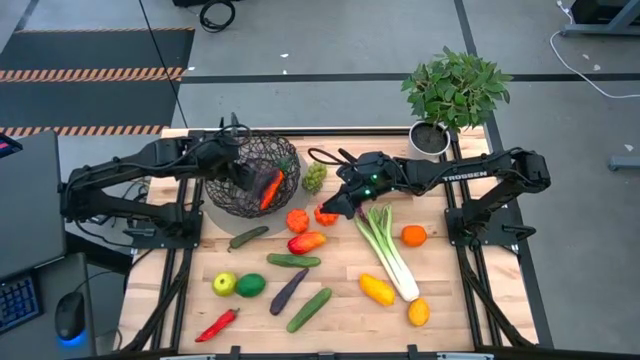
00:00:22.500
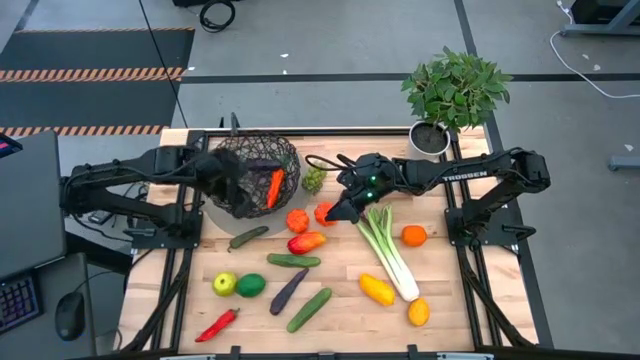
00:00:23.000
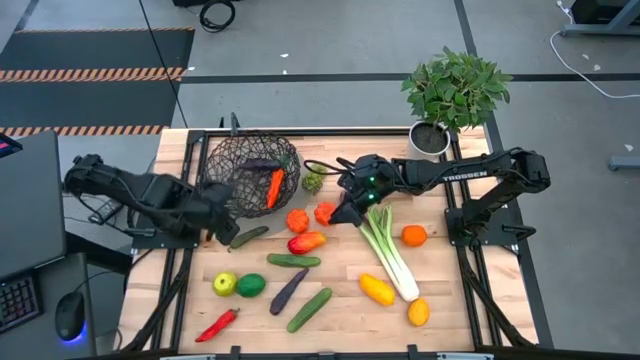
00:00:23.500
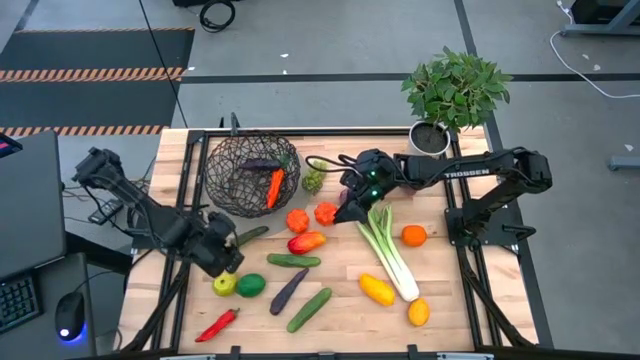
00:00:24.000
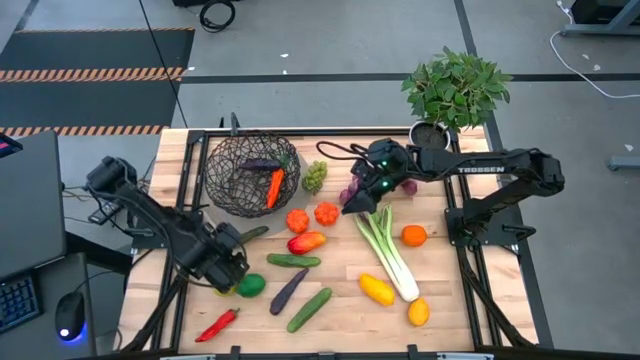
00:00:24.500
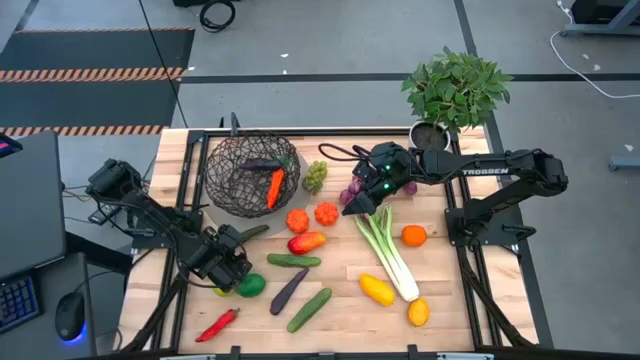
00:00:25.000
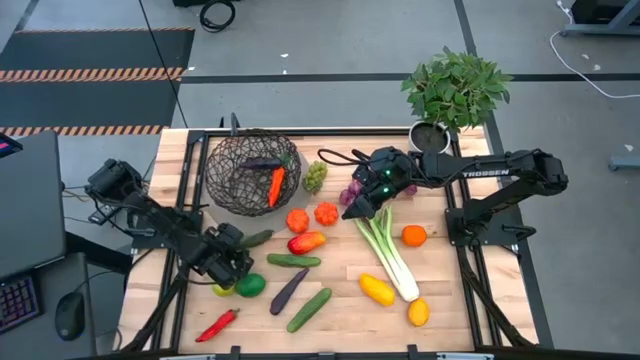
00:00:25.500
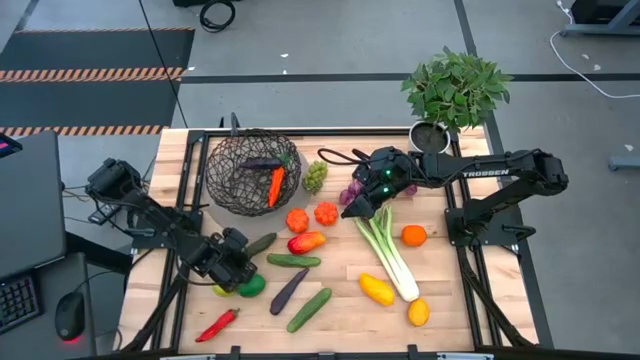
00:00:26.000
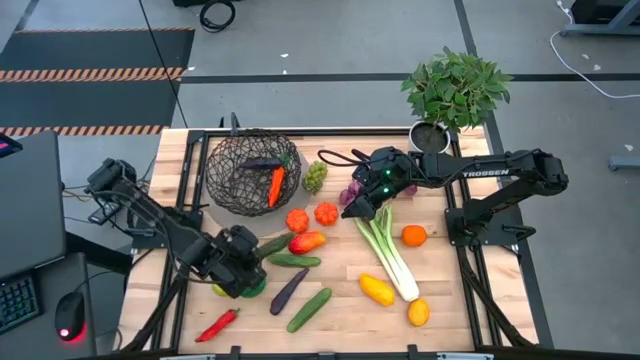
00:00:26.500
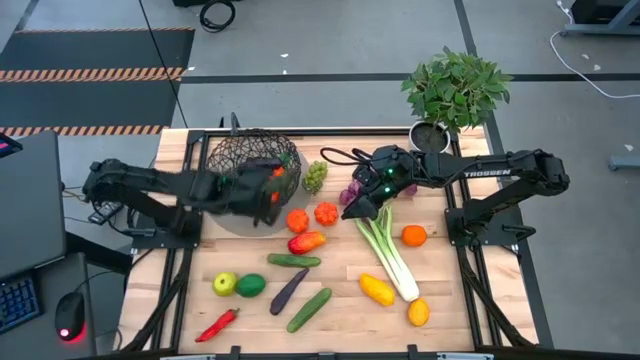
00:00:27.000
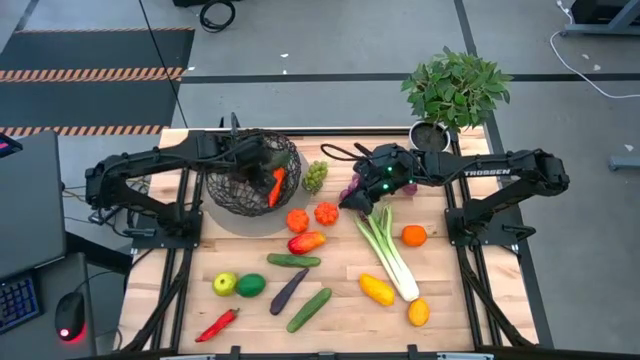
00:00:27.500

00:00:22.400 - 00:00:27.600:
Task: Build produce basket
Put the green chili pepper into the black wire basket

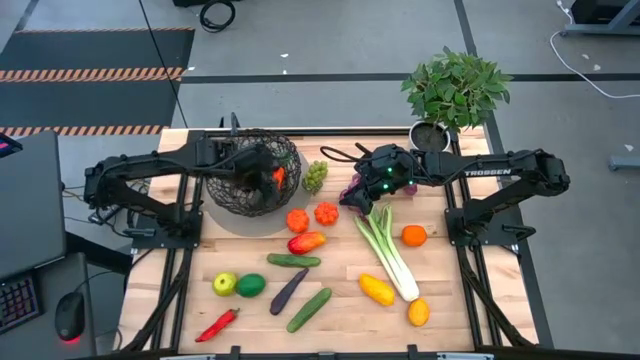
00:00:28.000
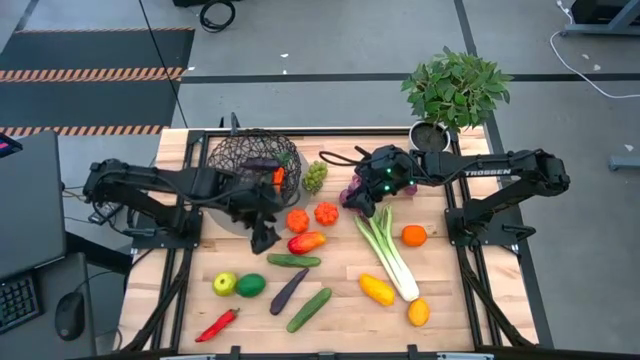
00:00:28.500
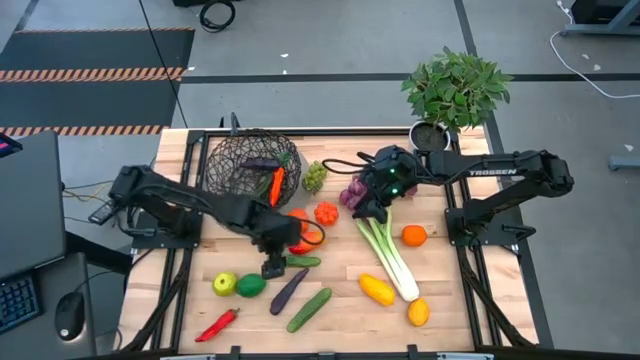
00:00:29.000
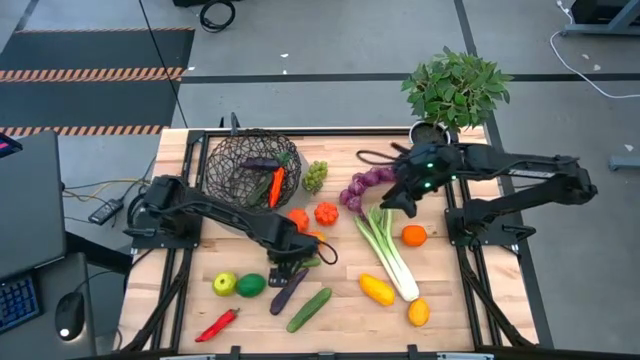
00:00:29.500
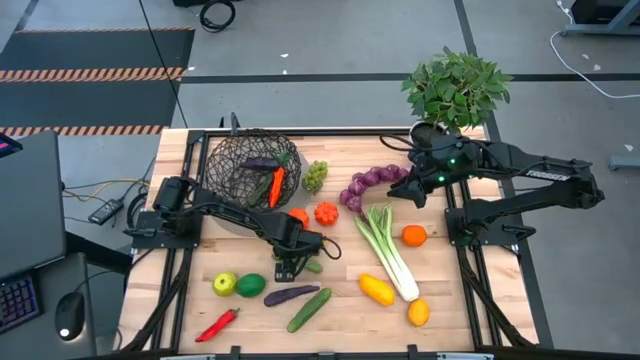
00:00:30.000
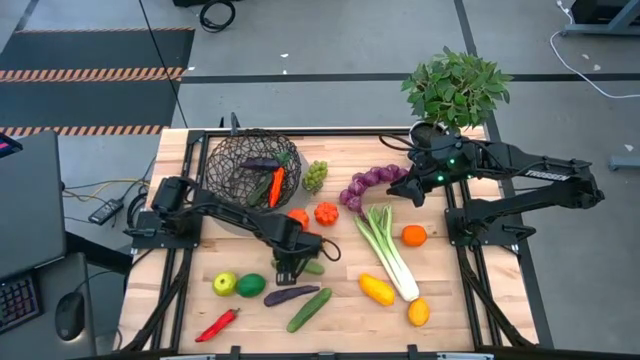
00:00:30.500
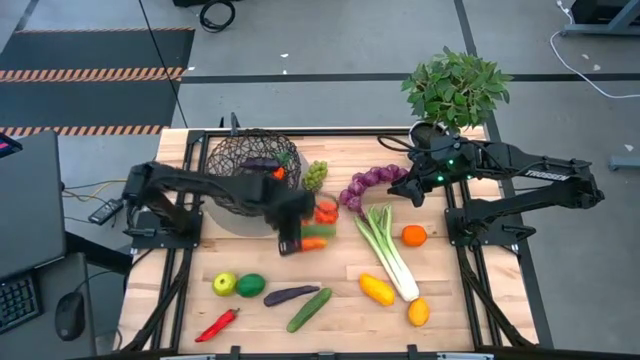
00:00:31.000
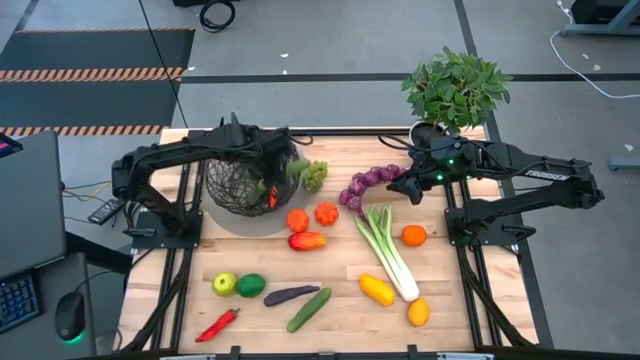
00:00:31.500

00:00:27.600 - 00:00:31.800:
Put the top green cucumber into the black wire basket

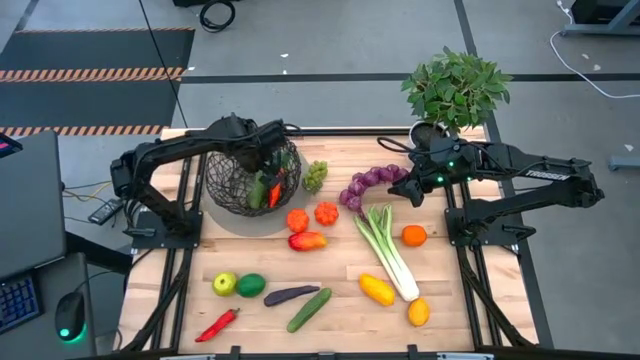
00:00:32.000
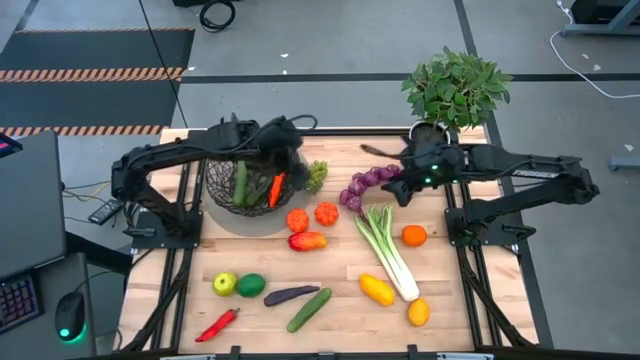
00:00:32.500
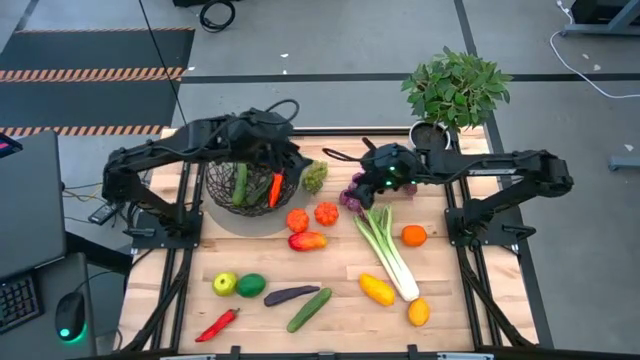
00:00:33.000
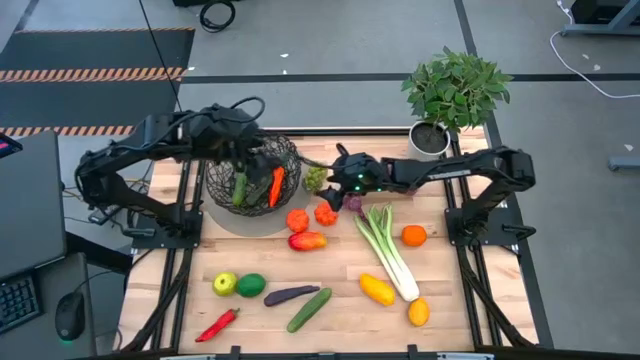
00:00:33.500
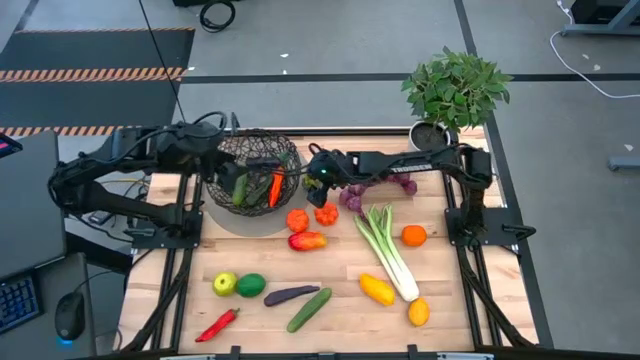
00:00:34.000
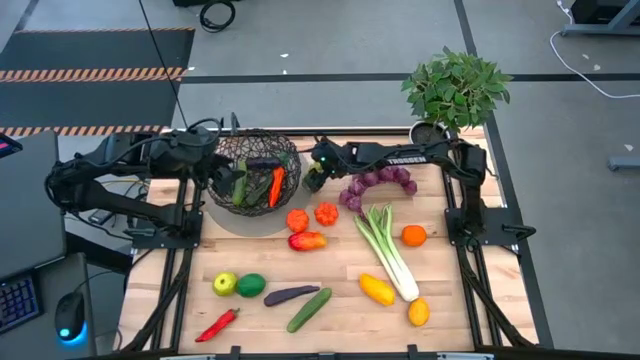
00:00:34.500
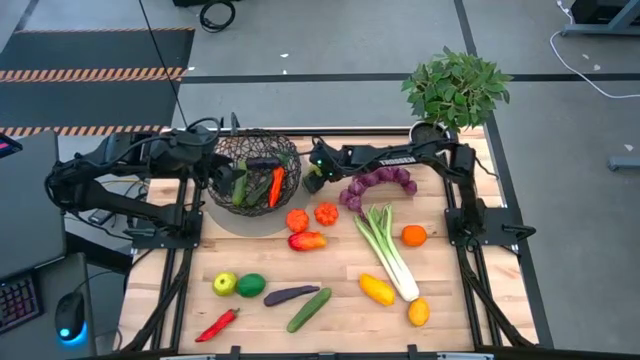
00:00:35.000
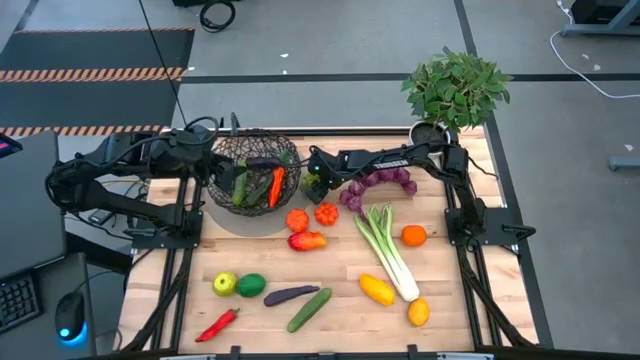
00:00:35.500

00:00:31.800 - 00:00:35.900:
Put the green grapes into the black wire basket

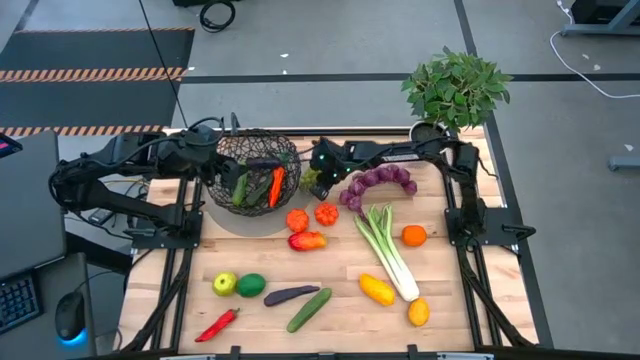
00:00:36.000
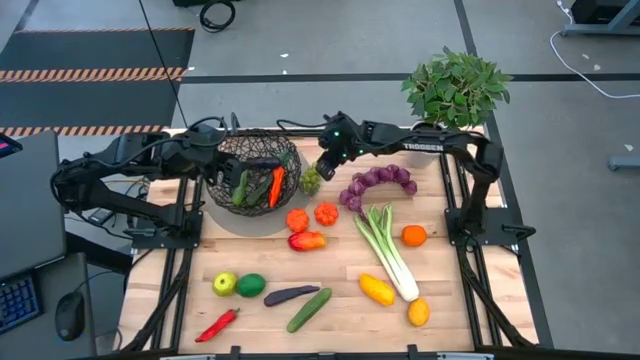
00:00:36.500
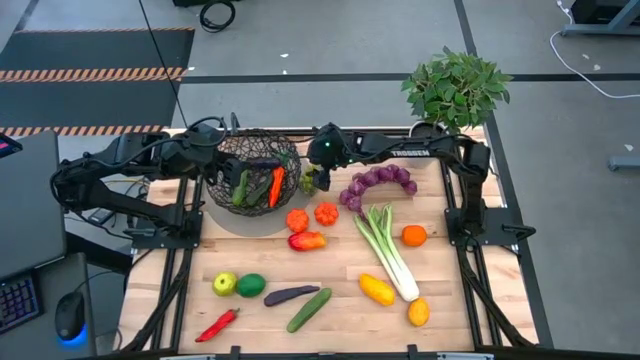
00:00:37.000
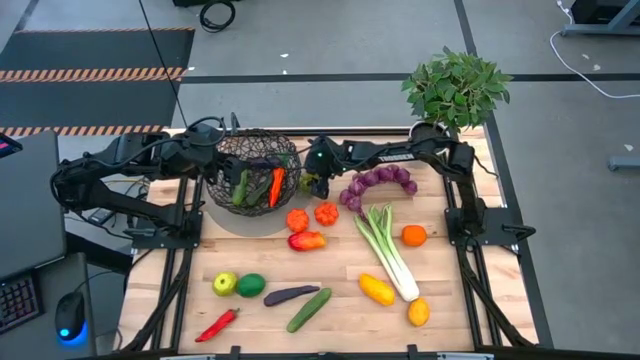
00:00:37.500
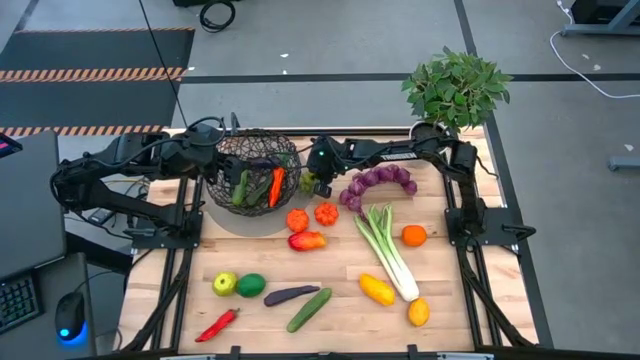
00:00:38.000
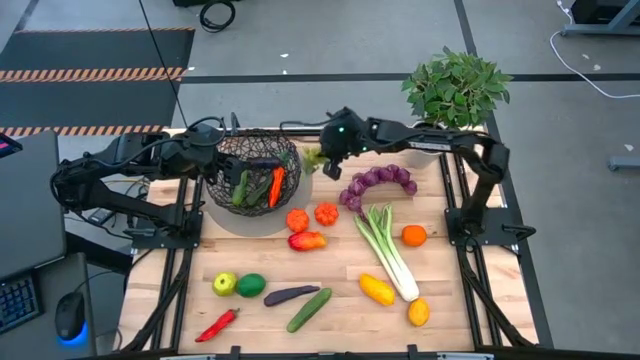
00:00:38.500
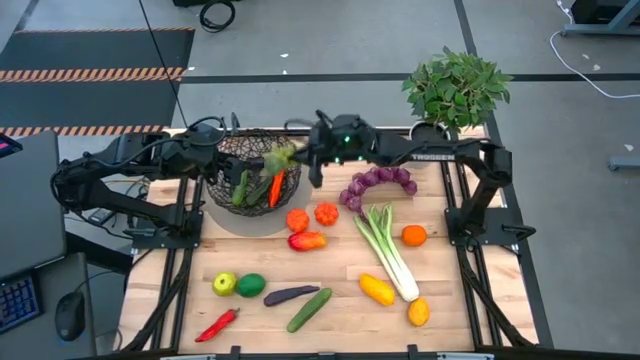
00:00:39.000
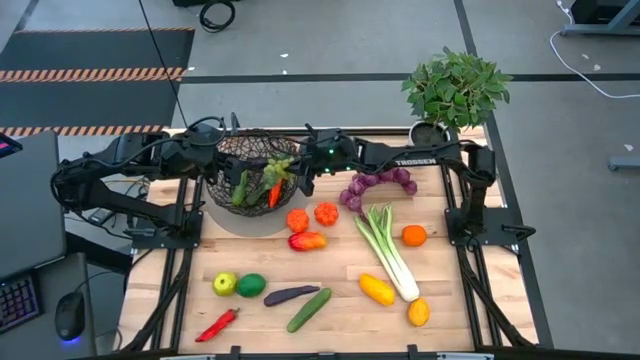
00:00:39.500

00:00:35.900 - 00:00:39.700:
Put the green grapes into the black wire basket

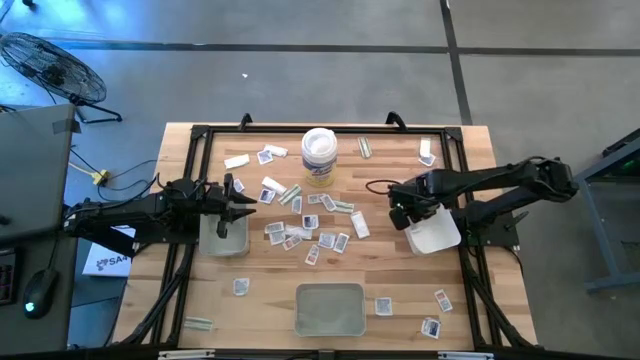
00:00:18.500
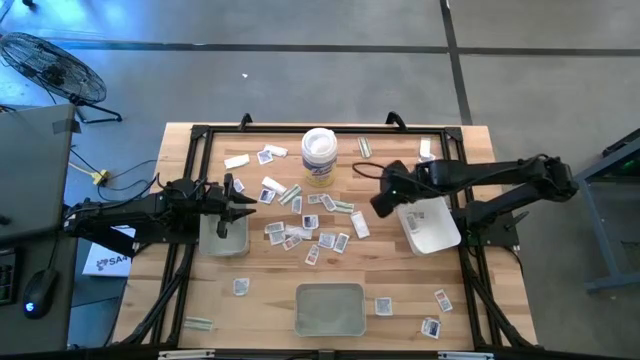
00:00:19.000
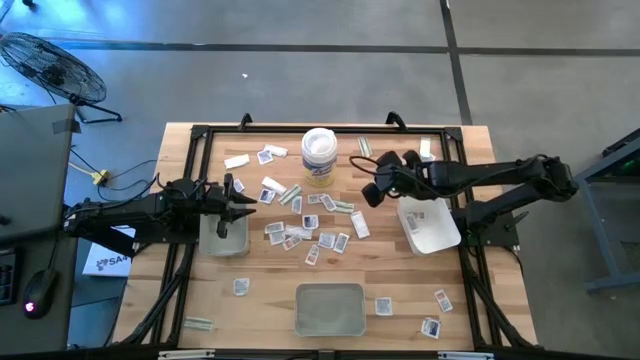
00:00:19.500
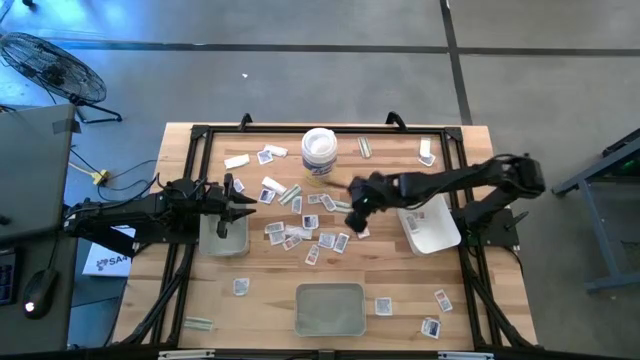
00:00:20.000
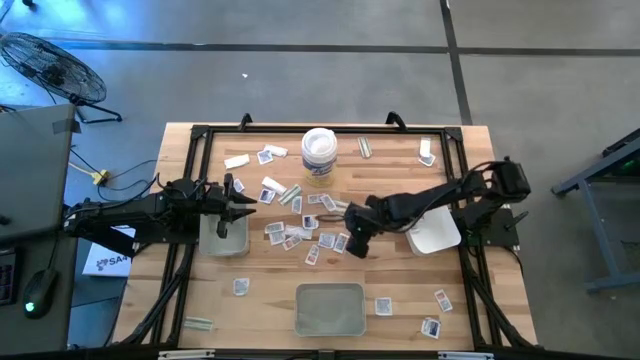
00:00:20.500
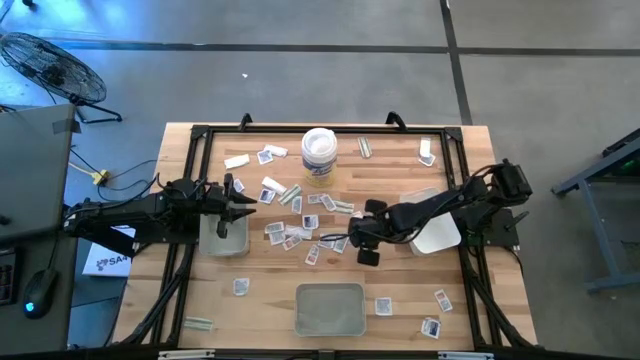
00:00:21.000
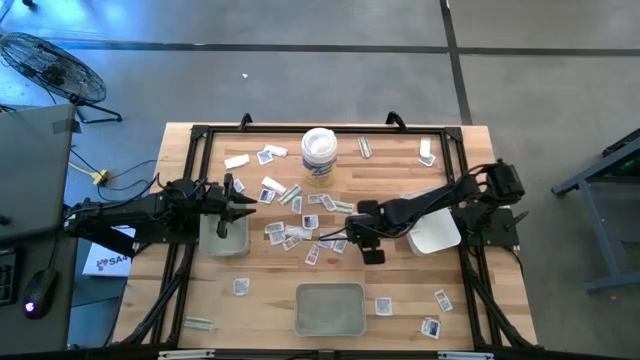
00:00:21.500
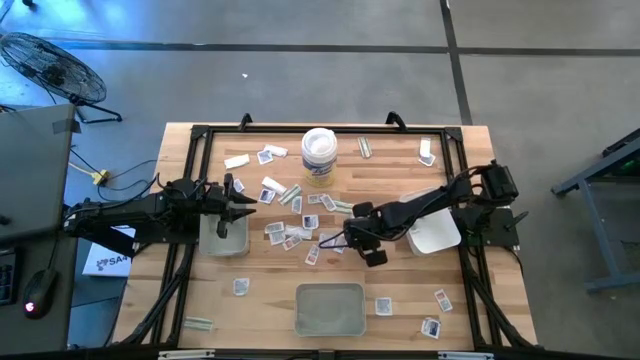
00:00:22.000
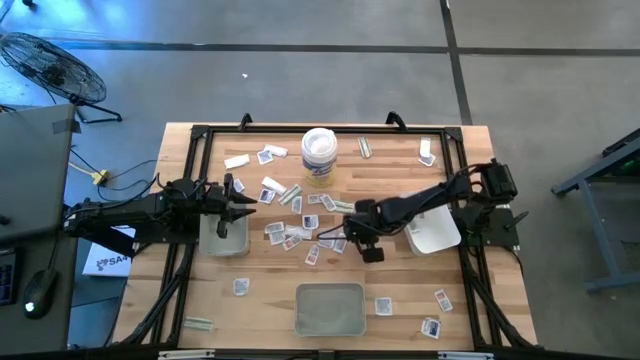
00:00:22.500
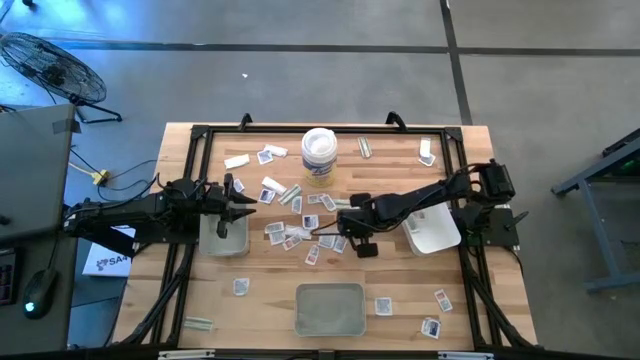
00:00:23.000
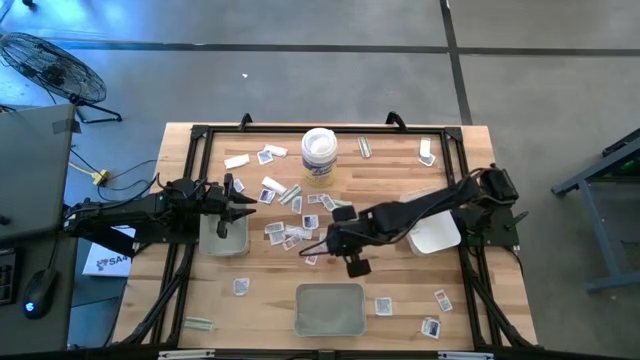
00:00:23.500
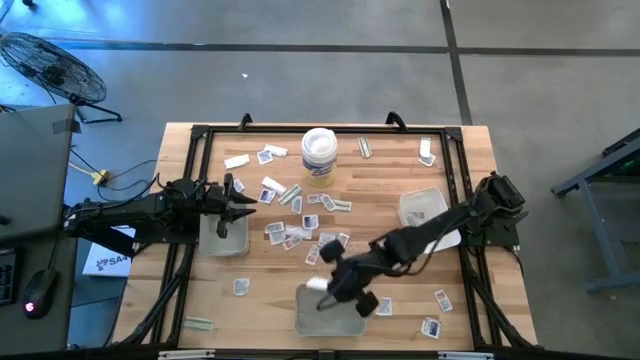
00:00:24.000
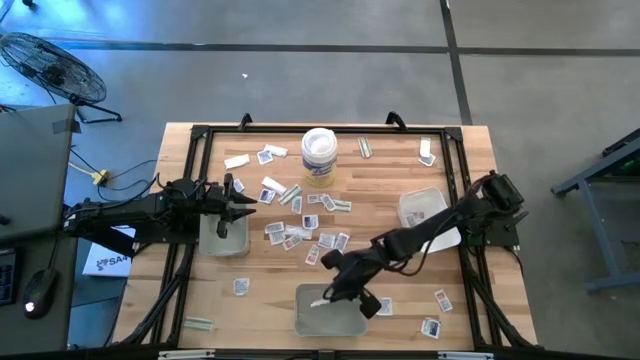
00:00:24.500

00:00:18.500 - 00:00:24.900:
Task: Pick & Place First Aid Supplies
Put the green bandage pack into the bottom gray bin
